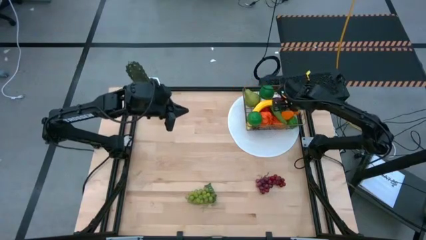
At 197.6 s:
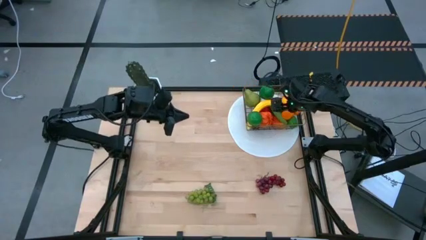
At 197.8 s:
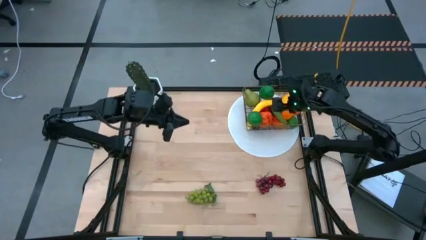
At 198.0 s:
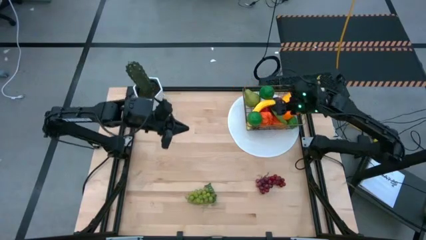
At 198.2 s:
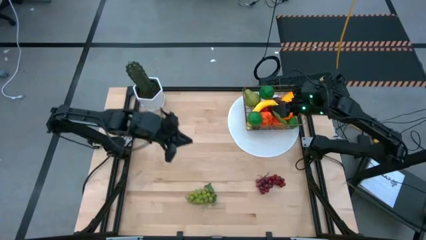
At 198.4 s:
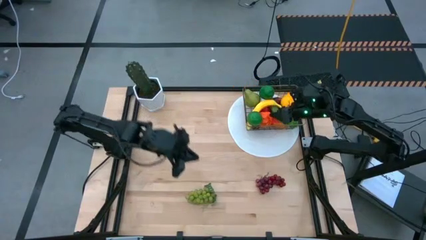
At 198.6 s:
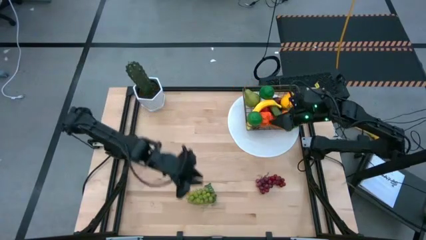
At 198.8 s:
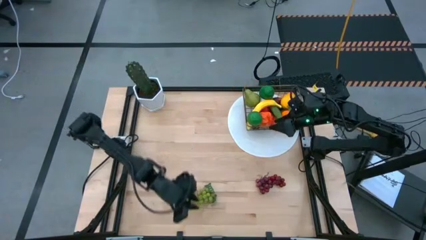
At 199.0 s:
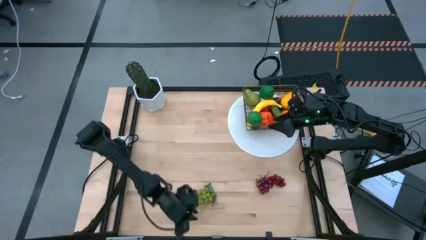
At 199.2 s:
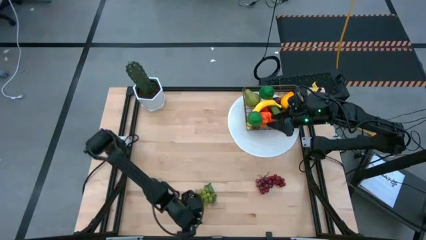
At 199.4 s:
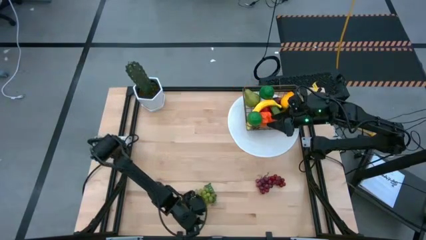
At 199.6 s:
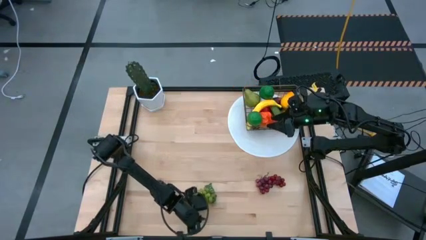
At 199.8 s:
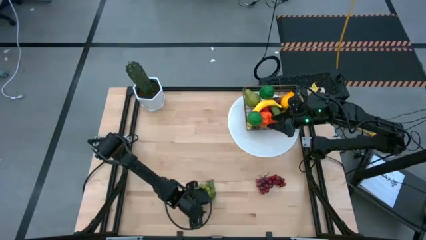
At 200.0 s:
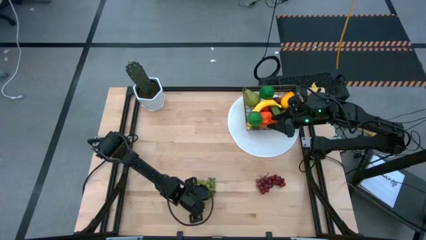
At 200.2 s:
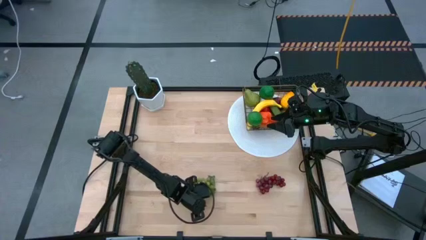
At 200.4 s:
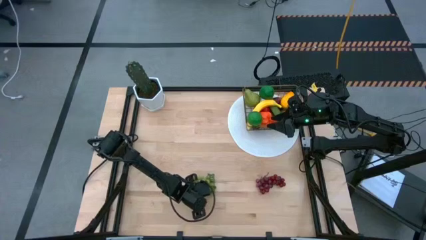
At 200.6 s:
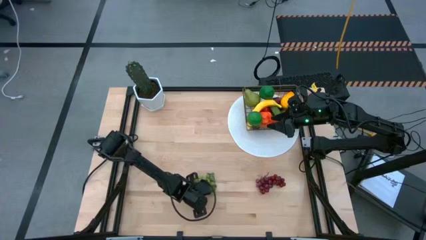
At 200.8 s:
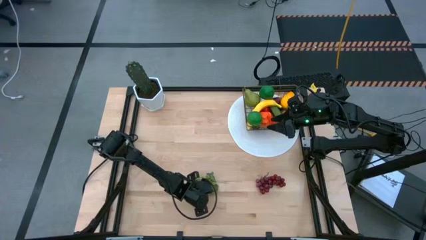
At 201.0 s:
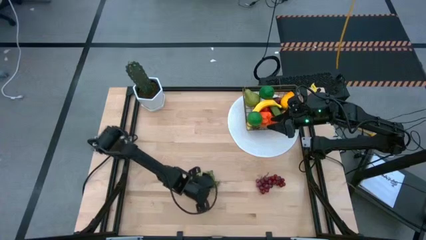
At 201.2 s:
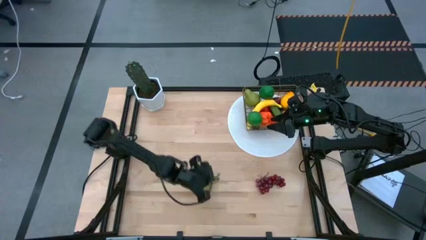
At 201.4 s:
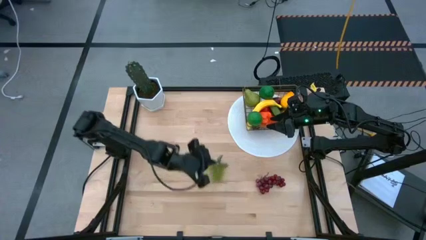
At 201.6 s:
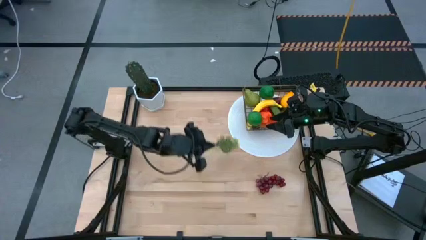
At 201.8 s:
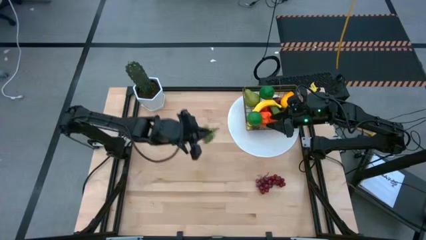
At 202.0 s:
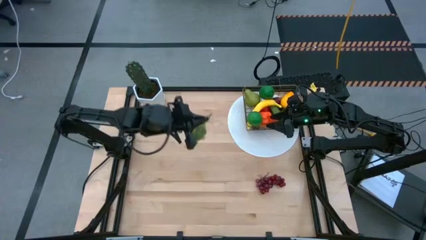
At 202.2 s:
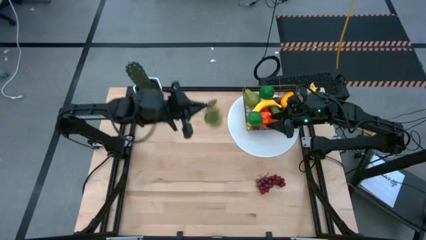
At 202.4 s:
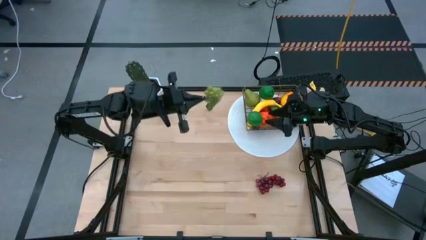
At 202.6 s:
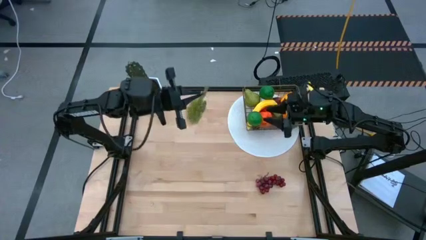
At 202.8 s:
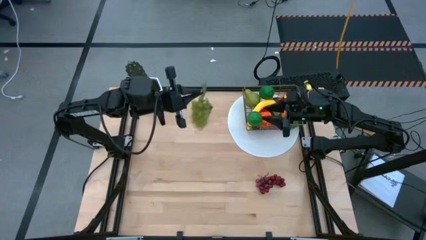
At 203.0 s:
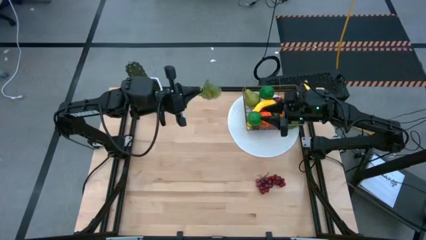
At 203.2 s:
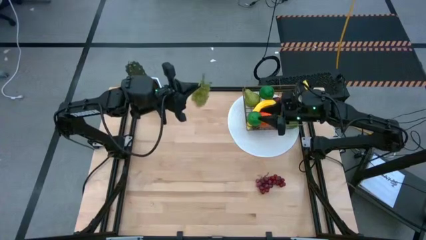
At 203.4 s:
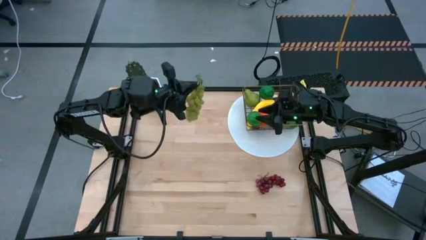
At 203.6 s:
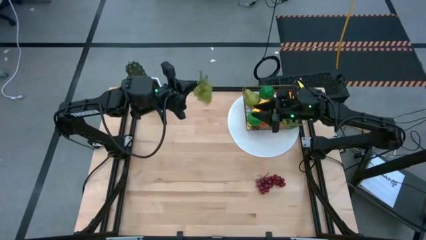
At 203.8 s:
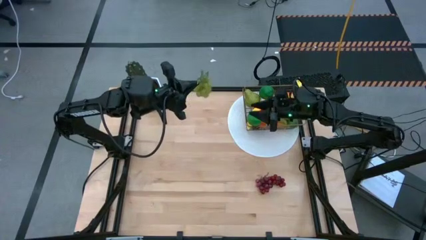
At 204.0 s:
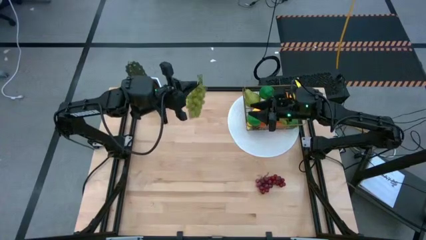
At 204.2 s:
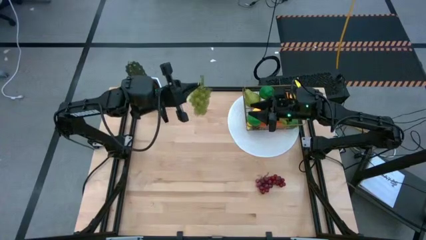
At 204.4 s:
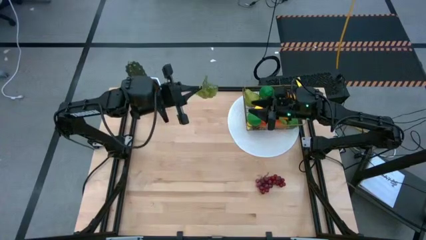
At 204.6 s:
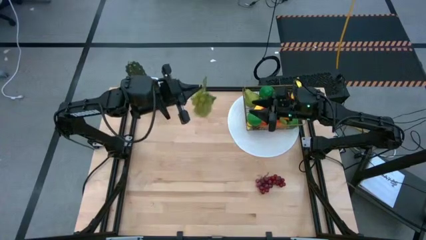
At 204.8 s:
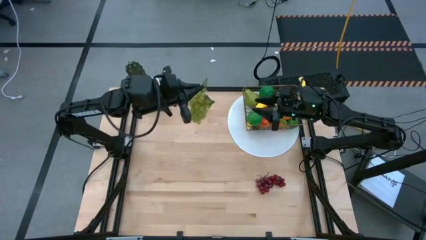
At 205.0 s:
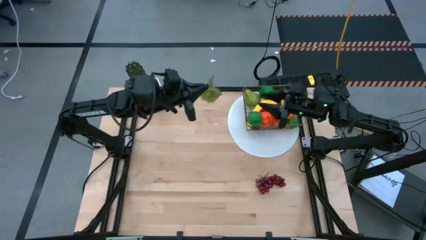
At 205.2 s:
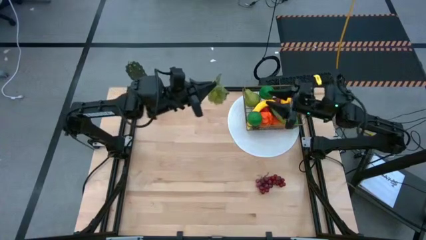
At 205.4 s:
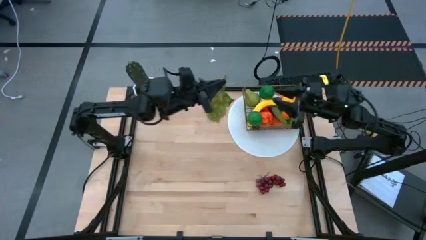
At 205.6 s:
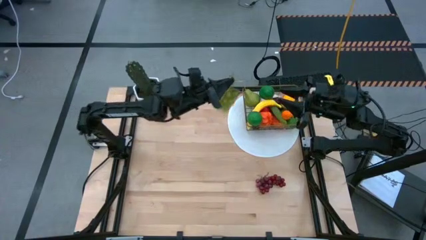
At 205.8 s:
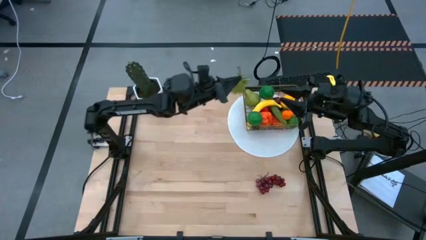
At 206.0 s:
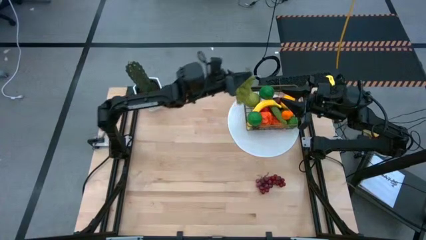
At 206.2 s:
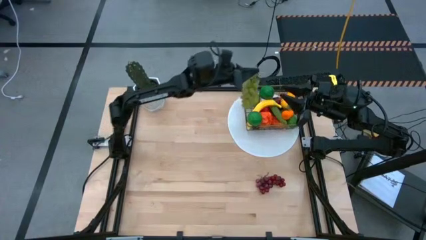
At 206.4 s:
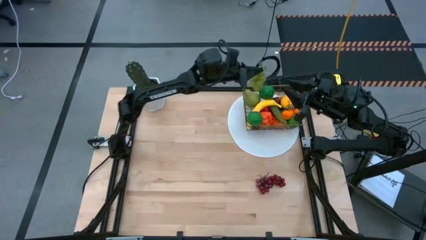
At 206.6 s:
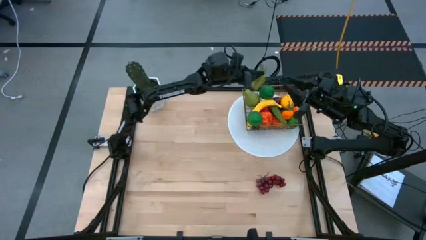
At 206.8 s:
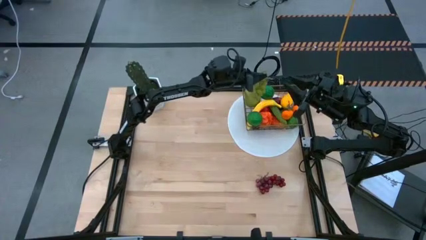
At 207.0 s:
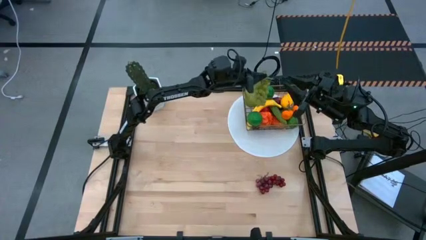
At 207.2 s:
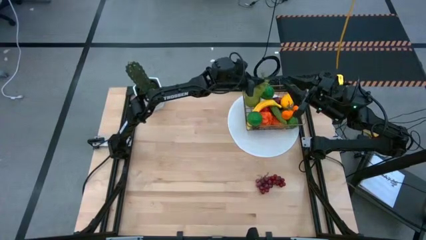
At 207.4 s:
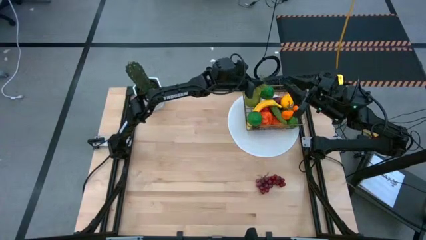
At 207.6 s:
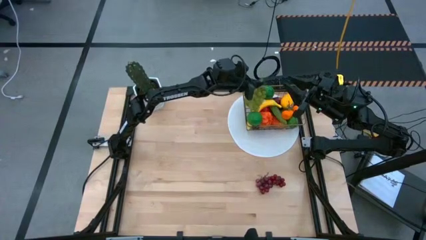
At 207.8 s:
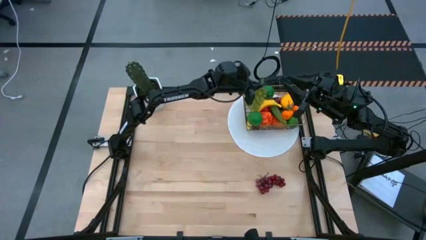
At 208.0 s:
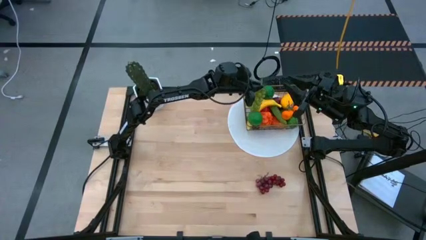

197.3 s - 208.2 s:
Task: Build produce basket
Put the green grapes into the gold wire basket
